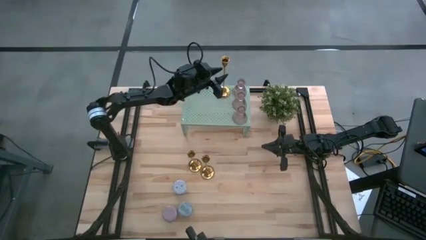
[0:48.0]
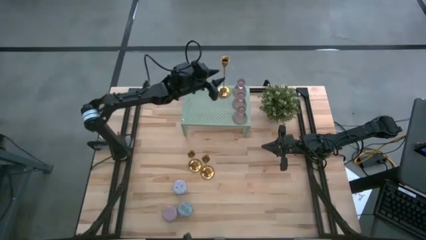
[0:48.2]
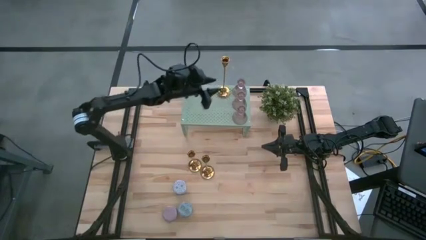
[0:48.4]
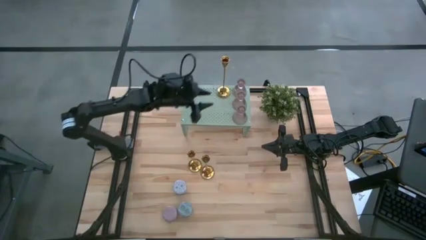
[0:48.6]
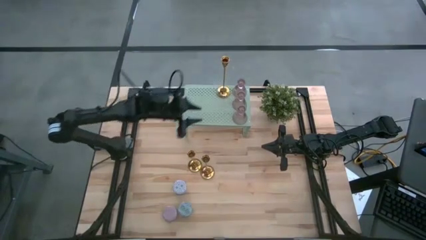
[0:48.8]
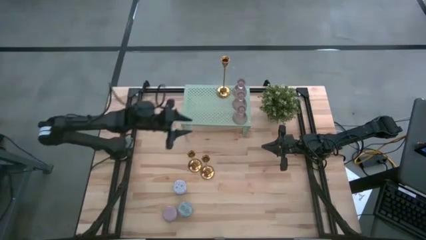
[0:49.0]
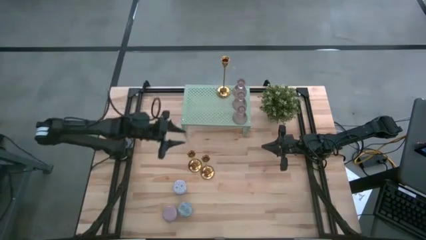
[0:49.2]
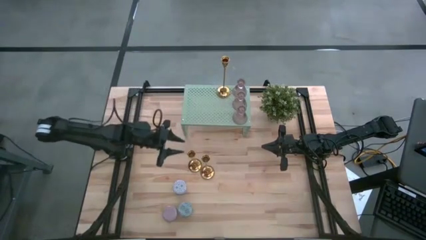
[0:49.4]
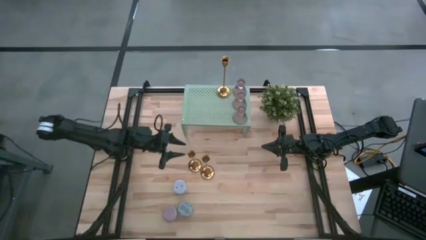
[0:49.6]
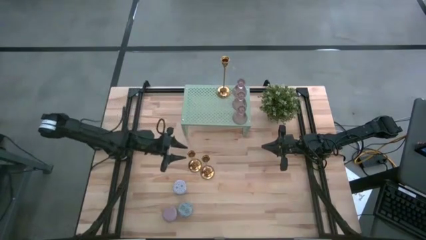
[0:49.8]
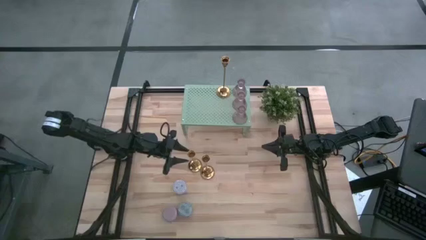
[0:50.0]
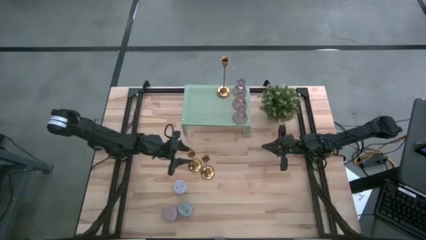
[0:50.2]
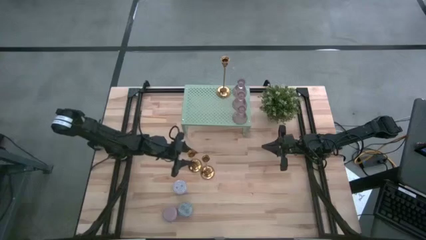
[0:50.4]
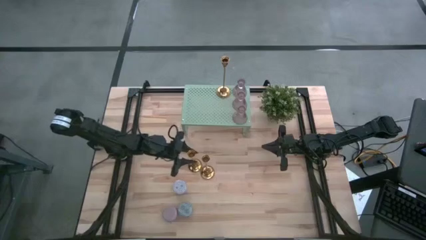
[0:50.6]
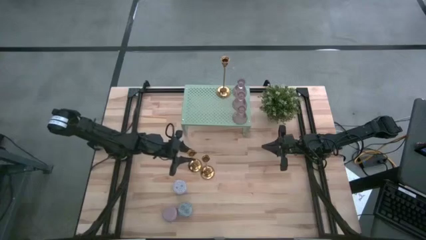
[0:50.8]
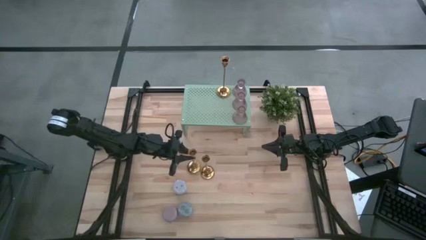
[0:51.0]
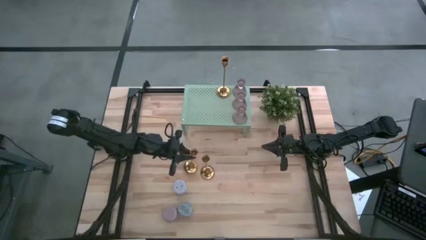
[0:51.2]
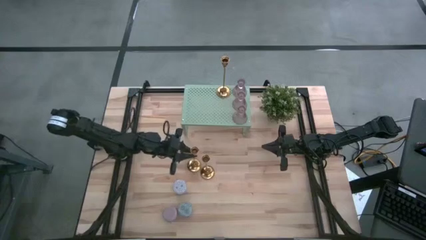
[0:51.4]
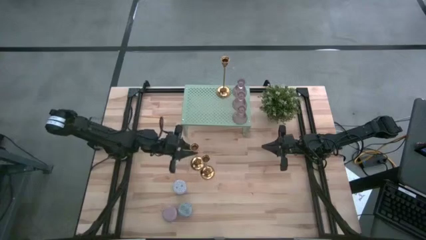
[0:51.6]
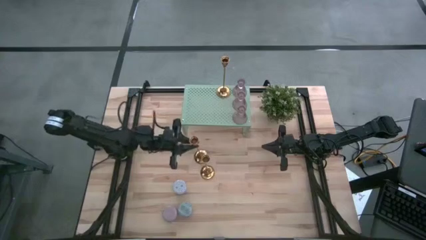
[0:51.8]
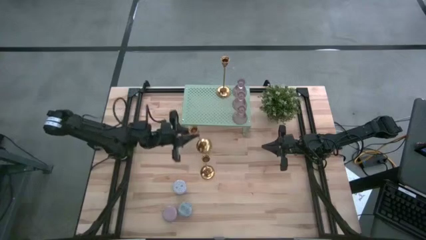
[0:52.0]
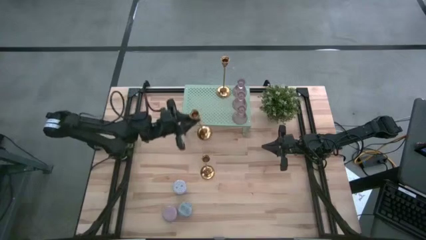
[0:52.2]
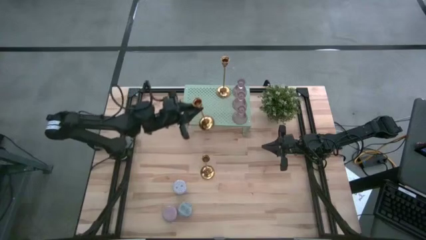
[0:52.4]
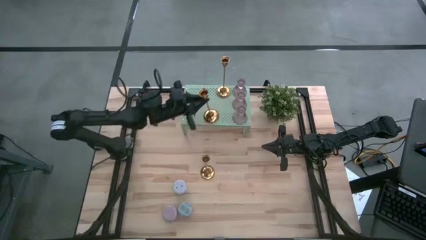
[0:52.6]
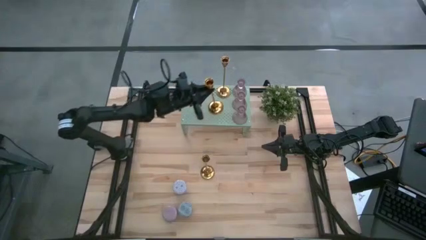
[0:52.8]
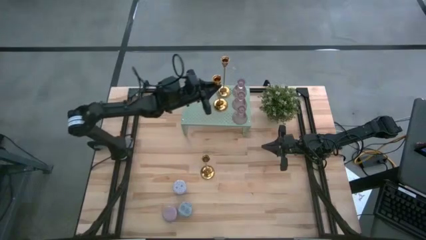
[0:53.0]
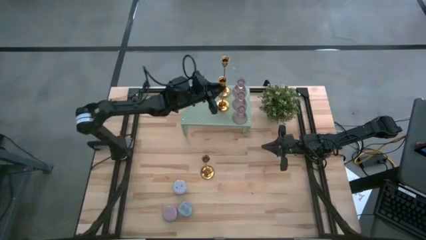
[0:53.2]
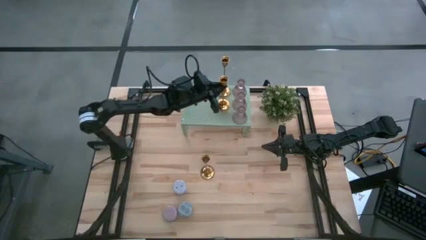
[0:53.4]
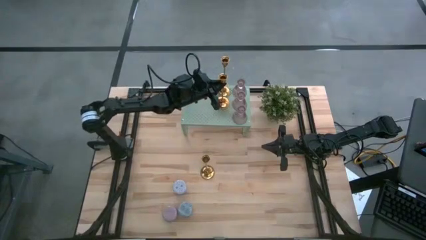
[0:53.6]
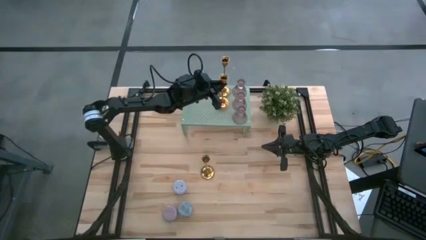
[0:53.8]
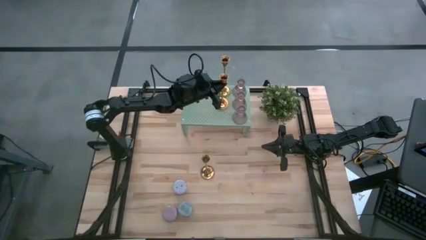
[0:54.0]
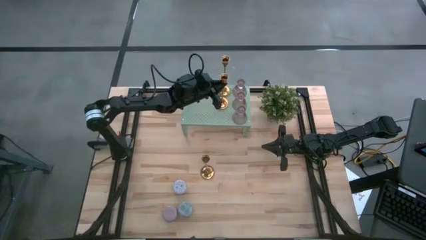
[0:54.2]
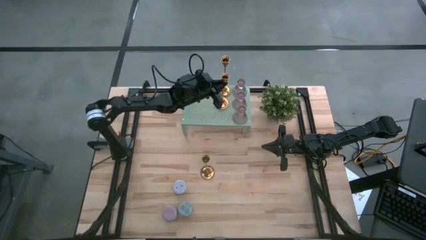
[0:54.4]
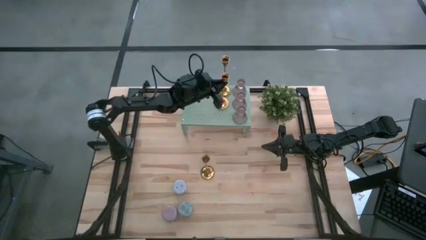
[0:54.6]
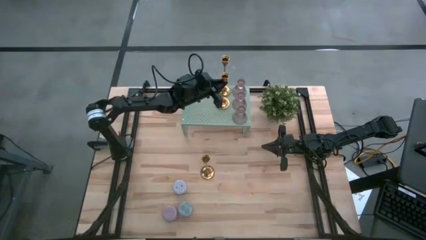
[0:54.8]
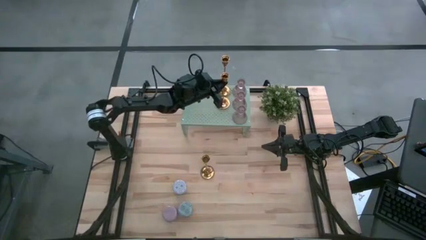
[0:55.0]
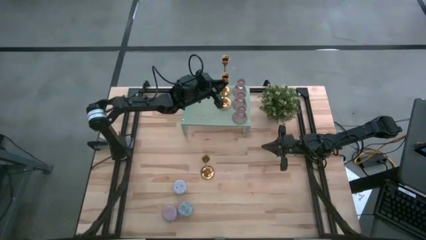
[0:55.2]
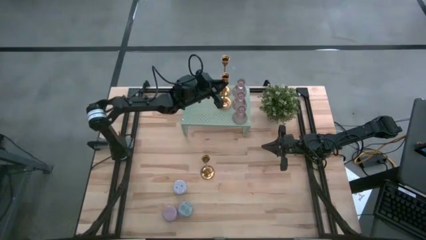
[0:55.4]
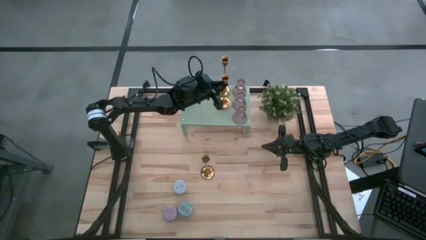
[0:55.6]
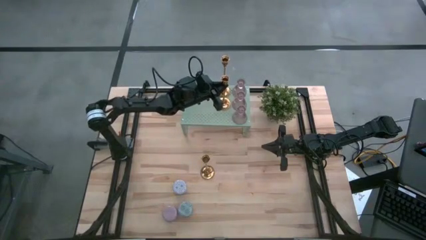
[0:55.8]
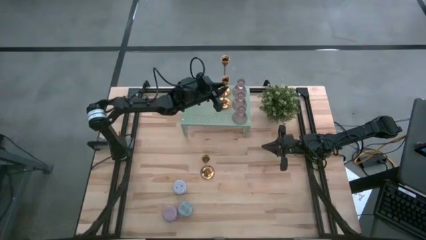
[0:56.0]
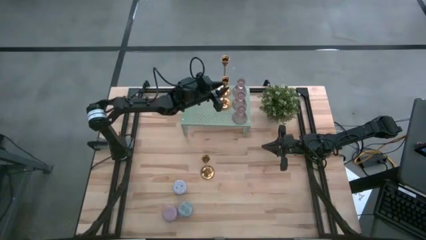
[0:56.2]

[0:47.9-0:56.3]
Task: Pick & Place candle stick holders
Put the left gold candle holder on the shelf aligned with the other candle holder on the shelf

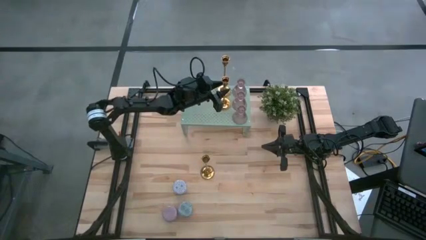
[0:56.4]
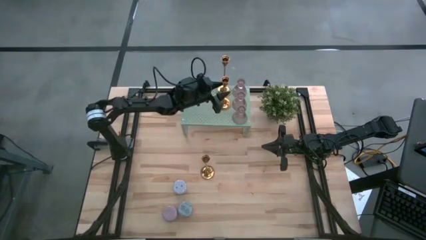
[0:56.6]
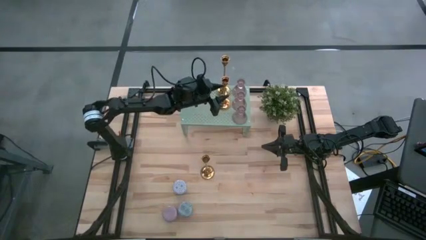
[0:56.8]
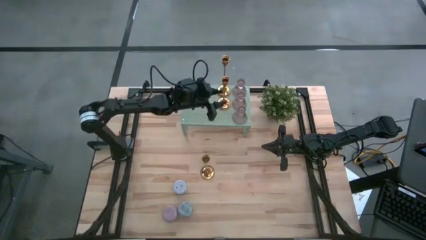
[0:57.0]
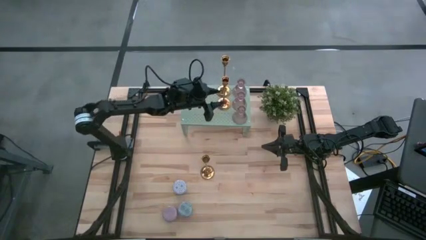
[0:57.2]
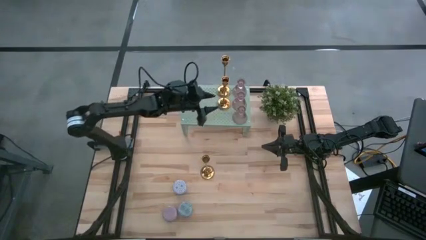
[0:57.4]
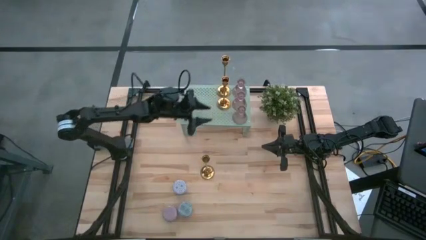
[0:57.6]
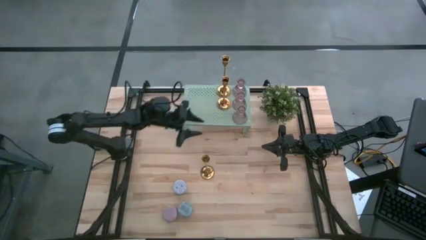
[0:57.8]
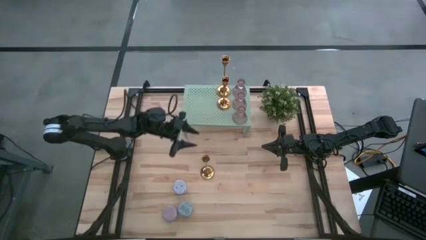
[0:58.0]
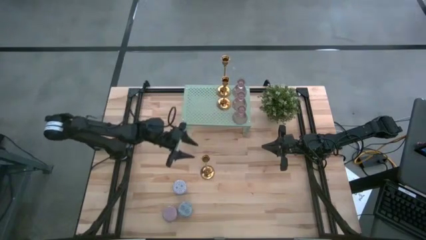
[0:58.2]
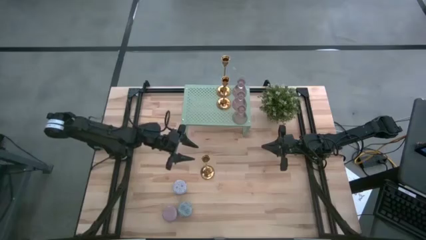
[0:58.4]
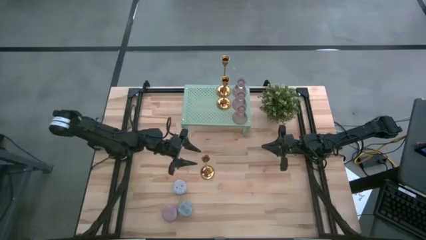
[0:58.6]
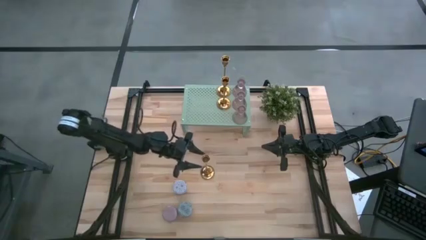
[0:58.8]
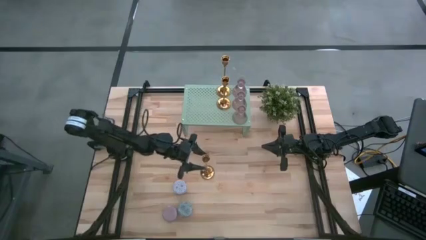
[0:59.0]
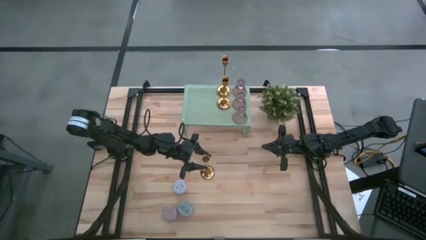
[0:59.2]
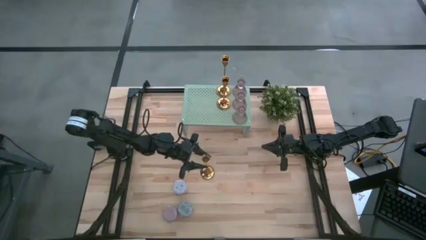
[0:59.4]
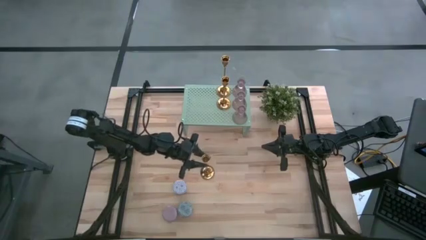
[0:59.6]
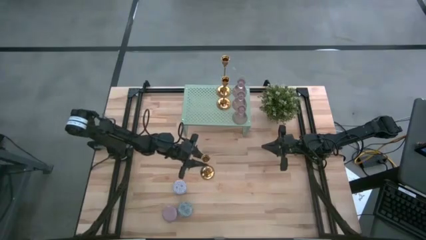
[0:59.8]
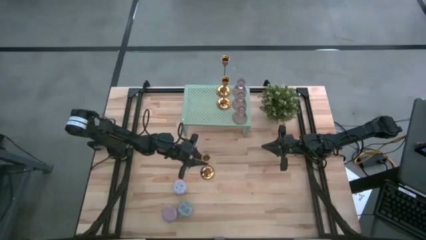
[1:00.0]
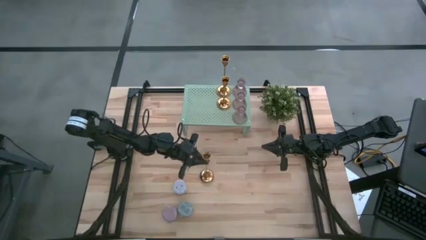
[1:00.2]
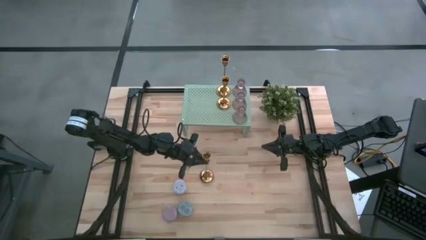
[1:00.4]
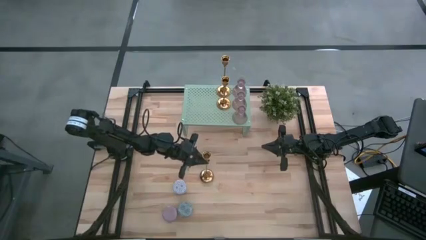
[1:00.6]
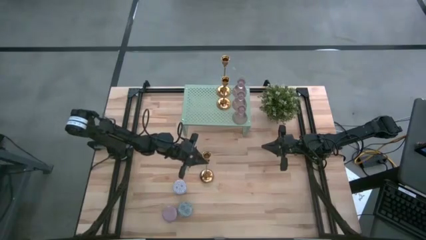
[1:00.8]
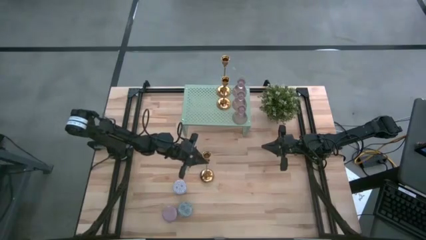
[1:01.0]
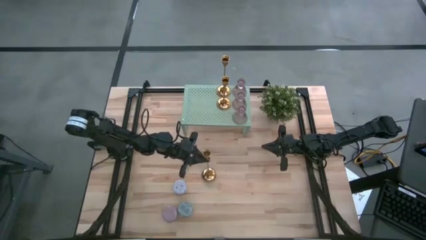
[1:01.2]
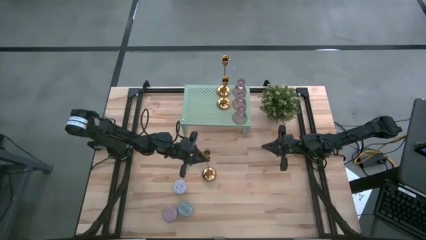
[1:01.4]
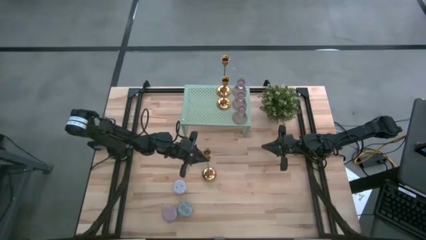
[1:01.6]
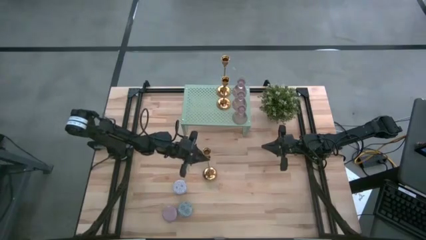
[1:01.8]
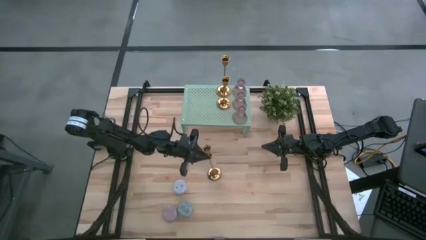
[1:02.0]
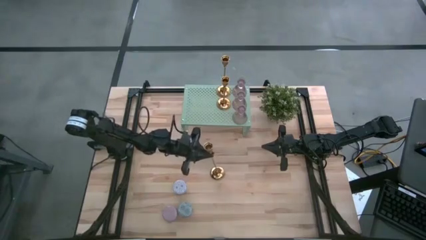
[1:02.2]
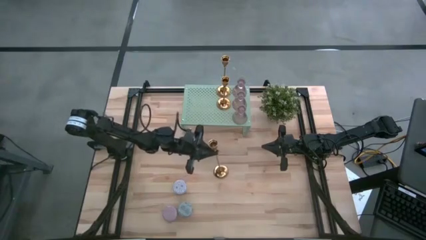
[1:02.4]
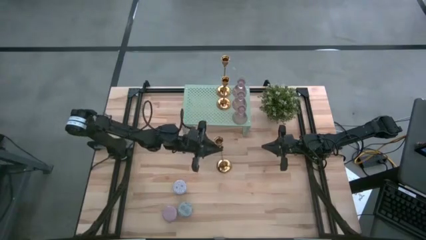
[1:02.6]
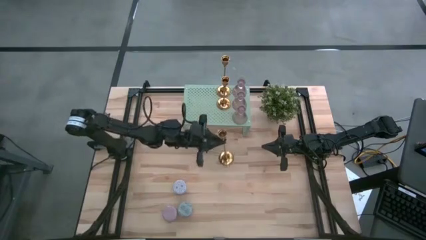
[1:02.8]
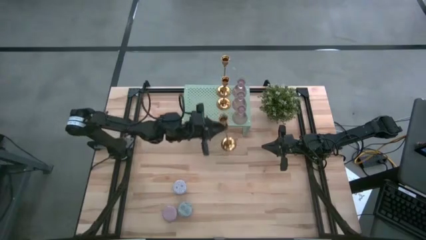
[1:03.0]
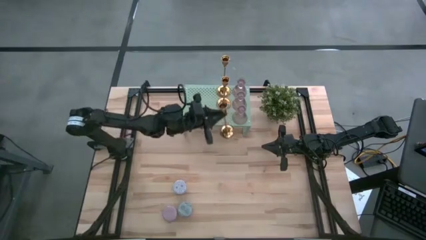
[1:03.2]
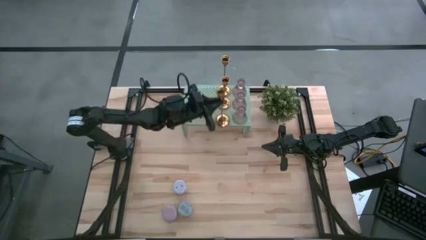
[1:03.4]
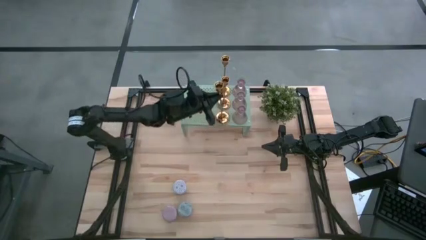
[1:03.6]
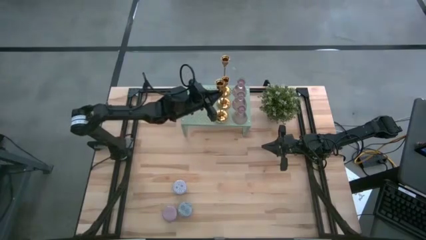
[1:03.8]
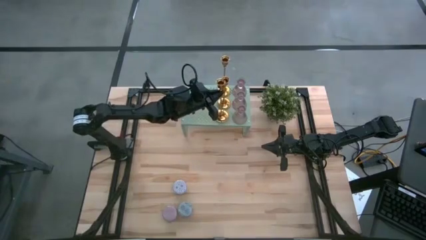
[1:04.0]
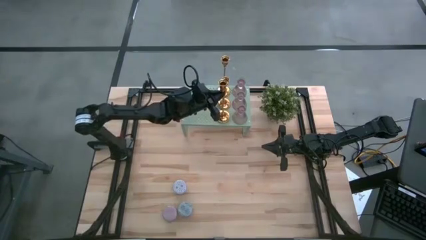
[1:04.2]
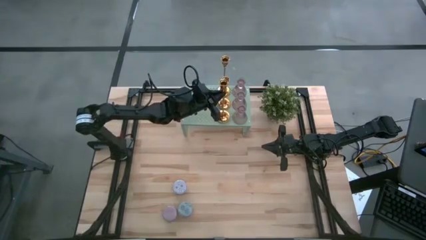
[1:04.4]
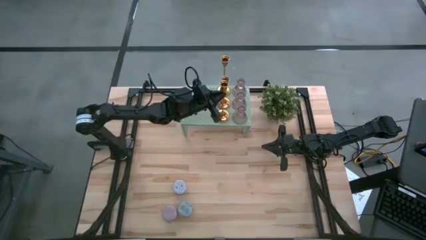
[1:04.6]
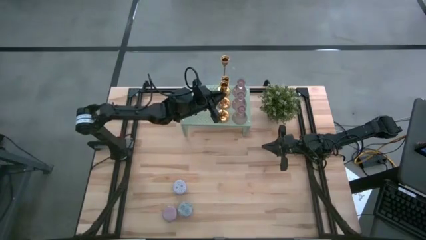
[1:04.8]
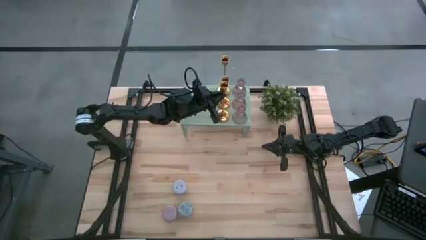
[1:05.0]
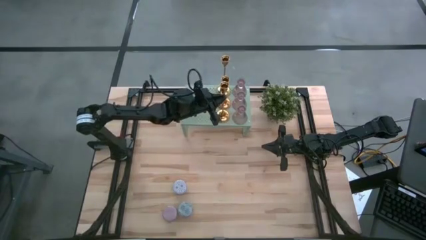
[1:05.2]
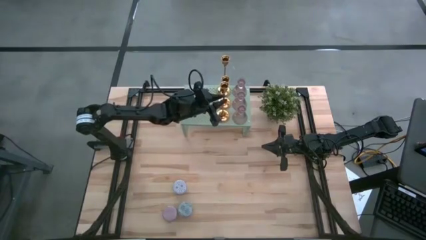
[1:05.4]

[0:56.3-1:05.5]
Put the gold candle holder on the shelf aligned with the other candle holder on the shelf
